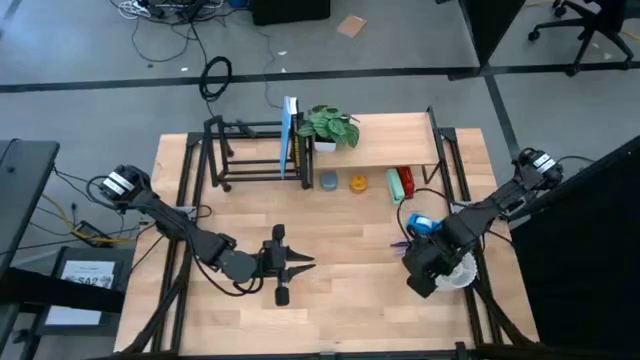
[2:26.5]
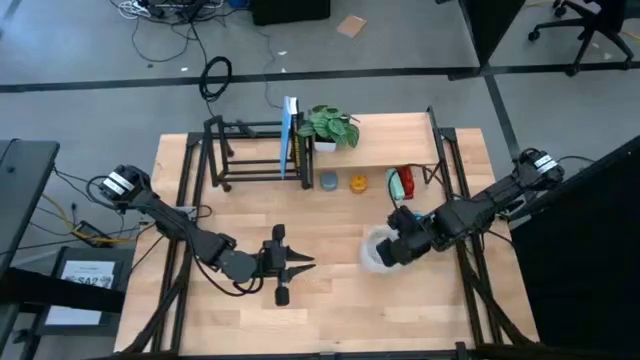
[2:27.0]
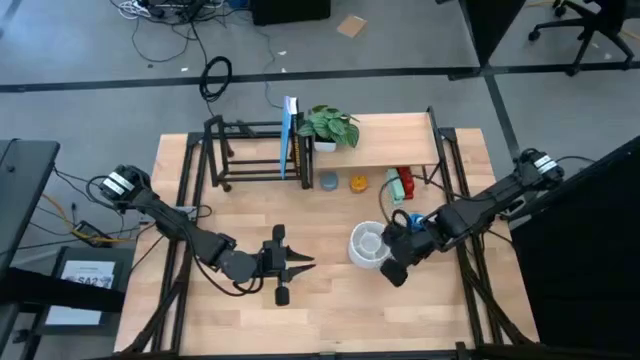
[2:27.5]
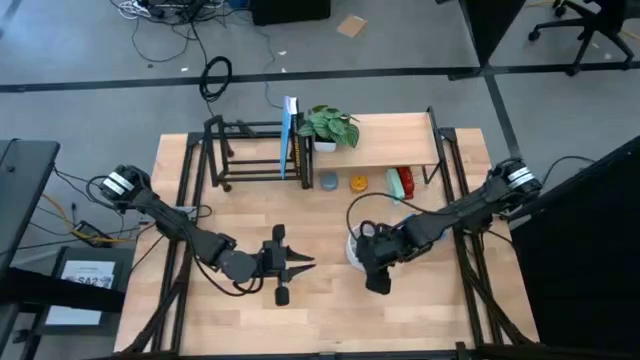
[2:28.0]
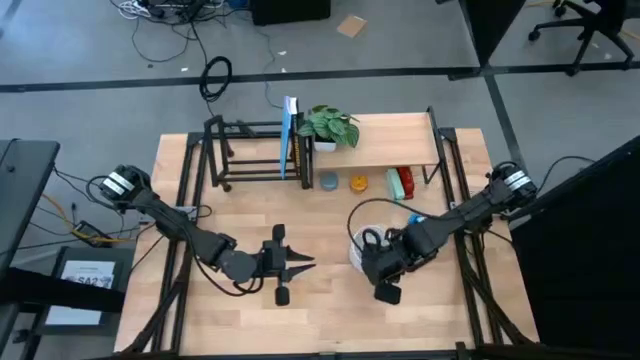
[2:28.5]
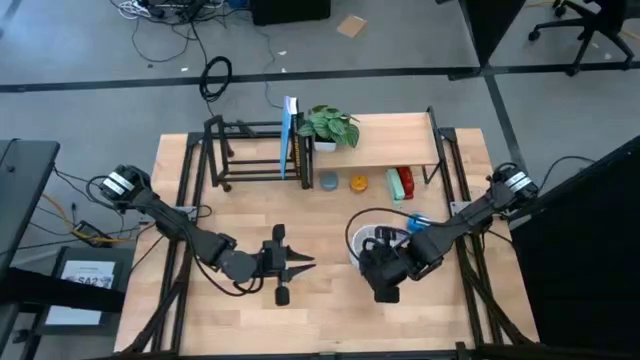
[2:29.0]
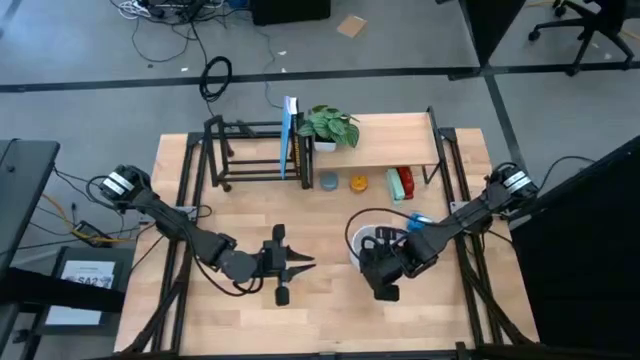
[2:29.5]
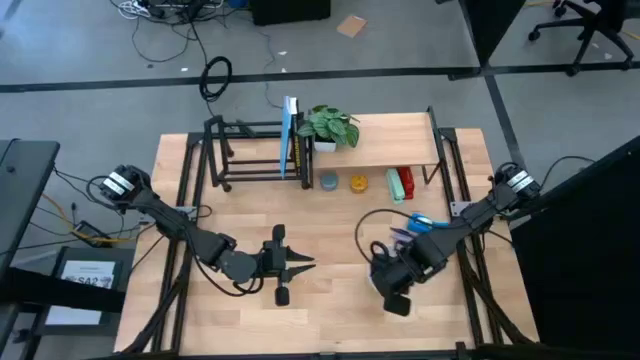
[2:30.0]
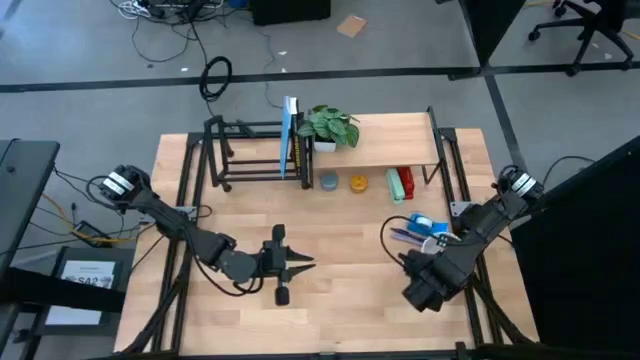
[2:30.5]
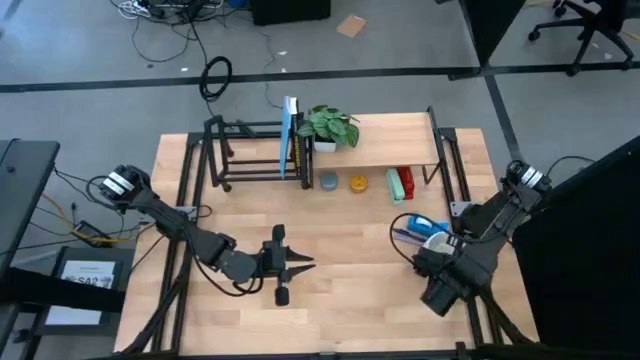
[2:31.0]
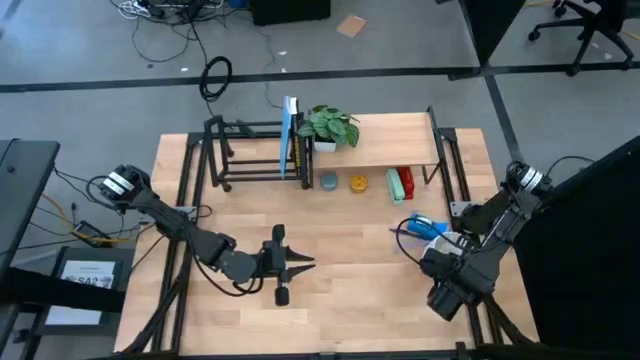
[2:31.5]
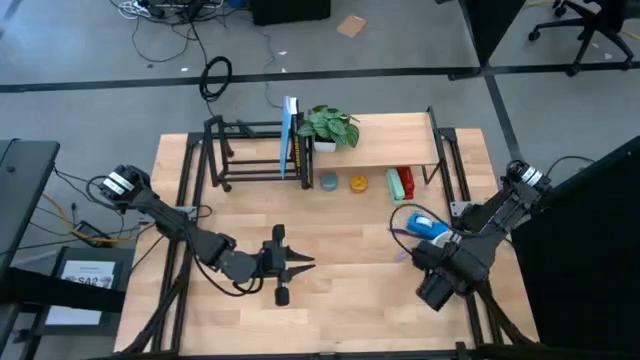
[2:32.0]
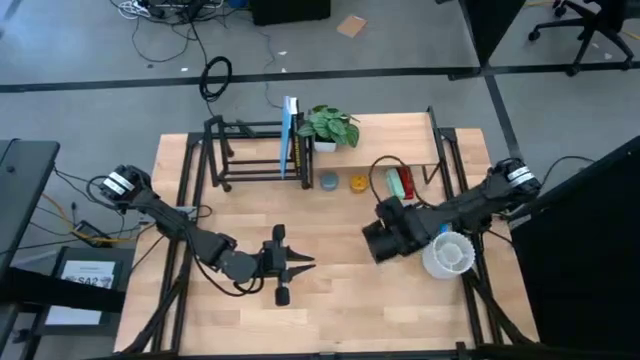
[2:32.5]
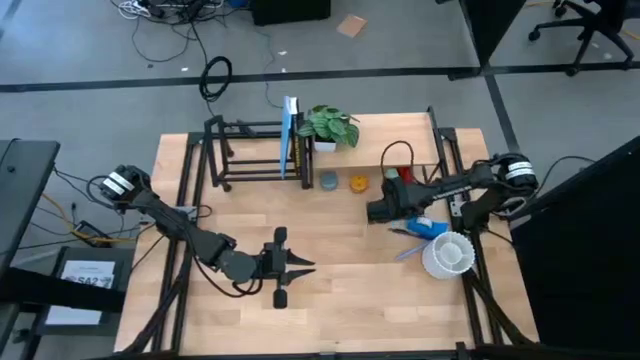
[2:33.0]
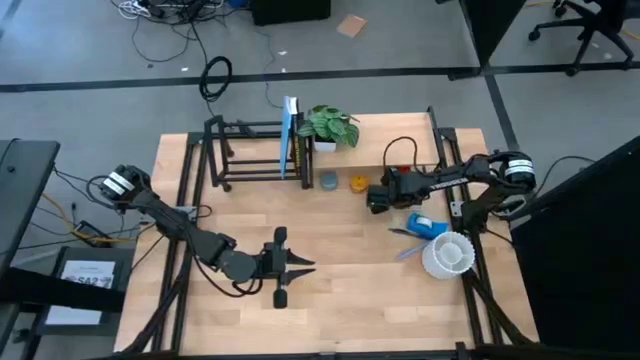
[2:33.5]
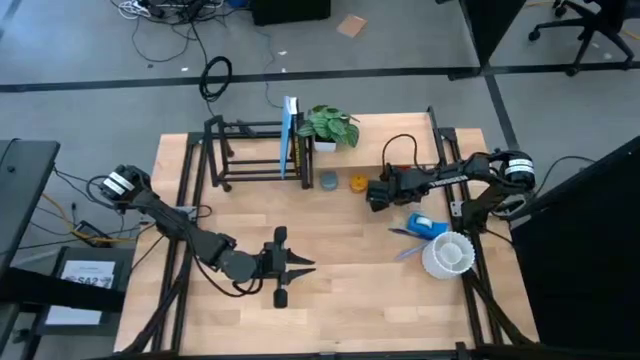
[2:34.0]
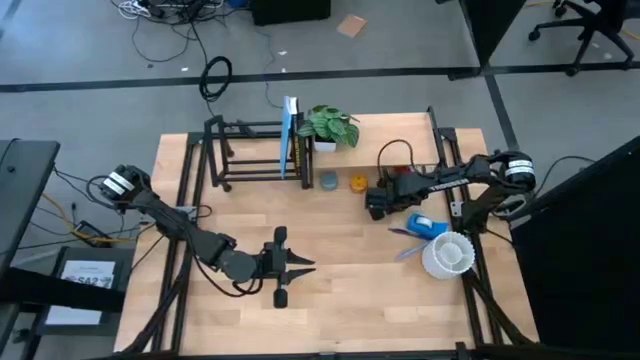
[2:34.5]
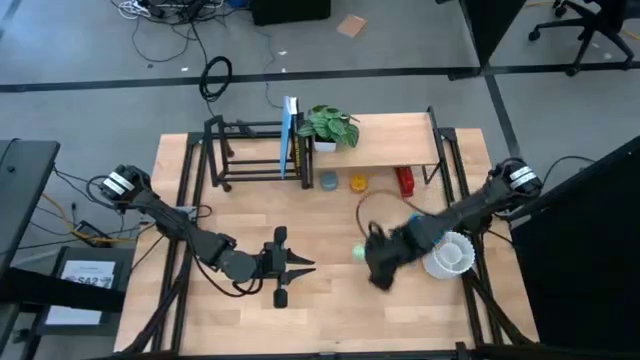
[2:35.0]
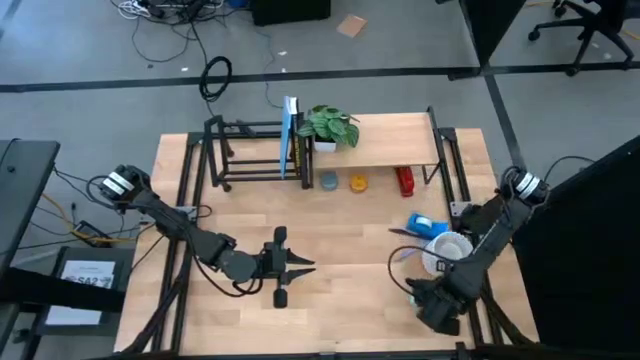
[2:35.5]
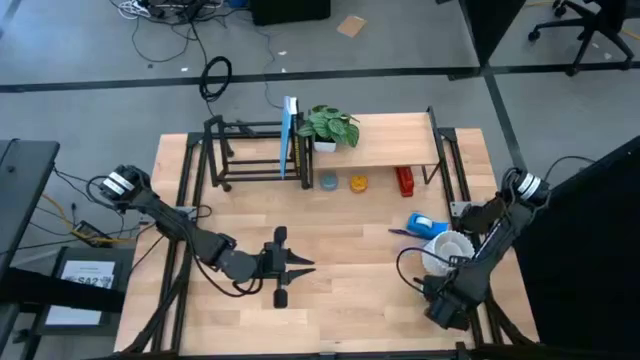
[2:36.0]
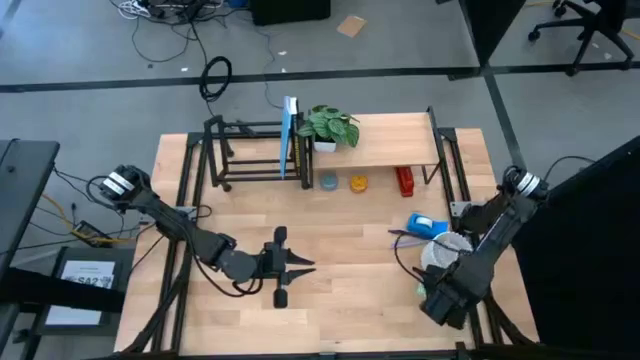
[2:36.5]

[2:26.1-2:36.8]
Task: Stock shelves
Remove the green stapler from under the shelf

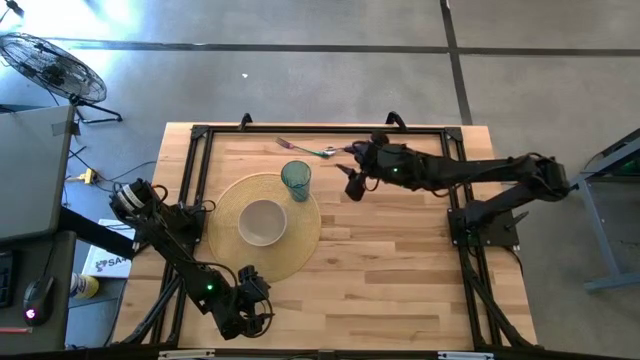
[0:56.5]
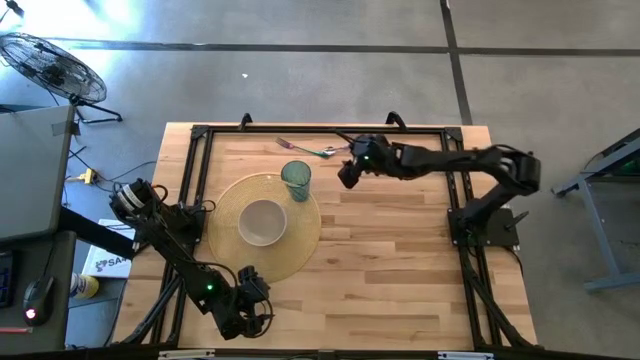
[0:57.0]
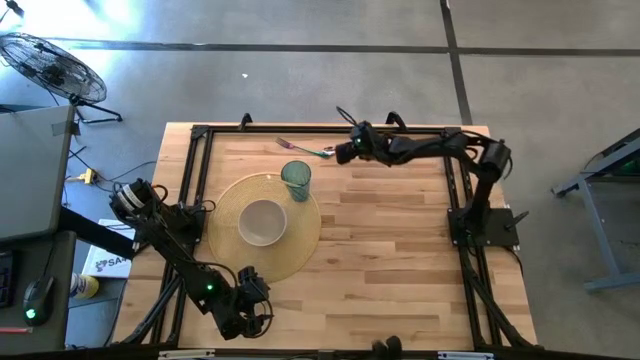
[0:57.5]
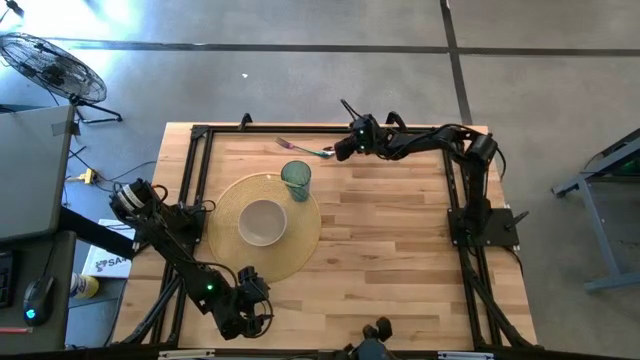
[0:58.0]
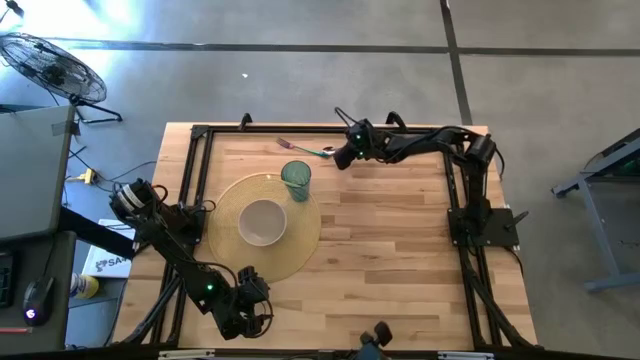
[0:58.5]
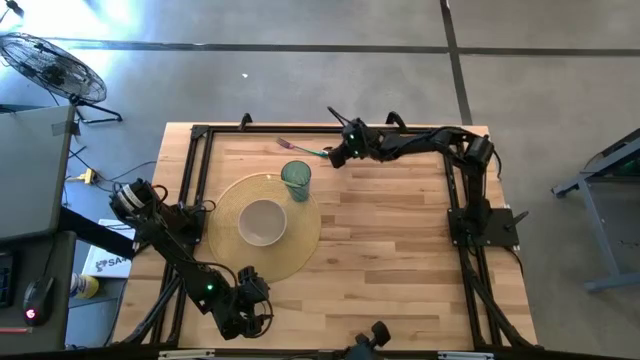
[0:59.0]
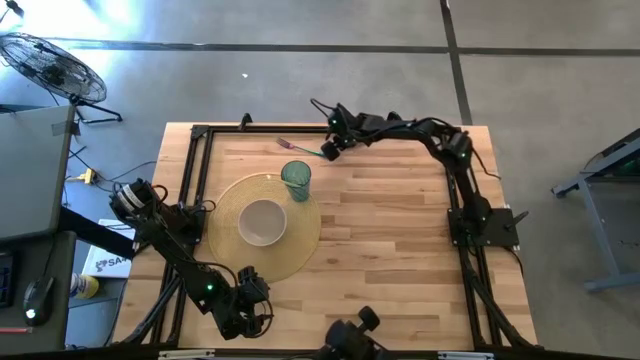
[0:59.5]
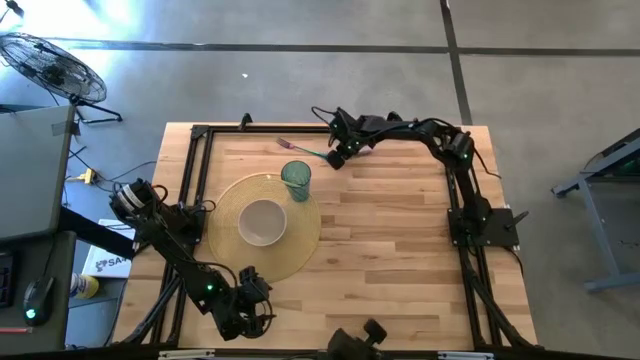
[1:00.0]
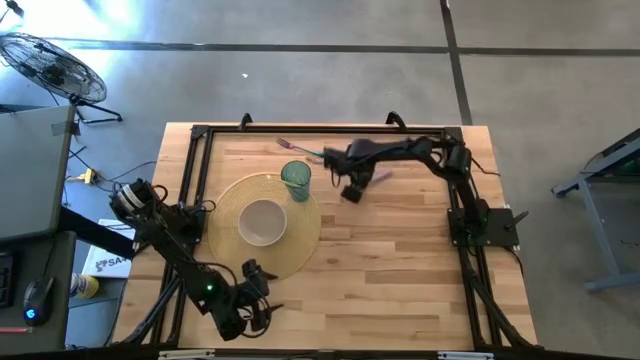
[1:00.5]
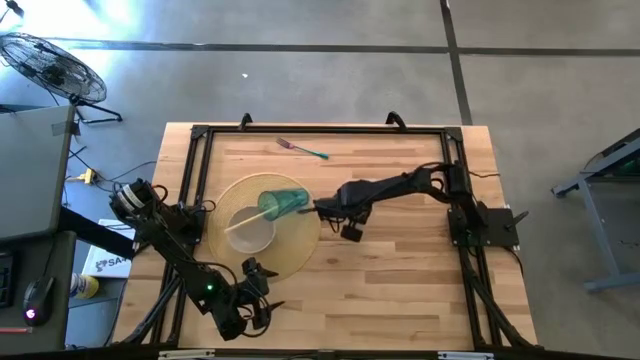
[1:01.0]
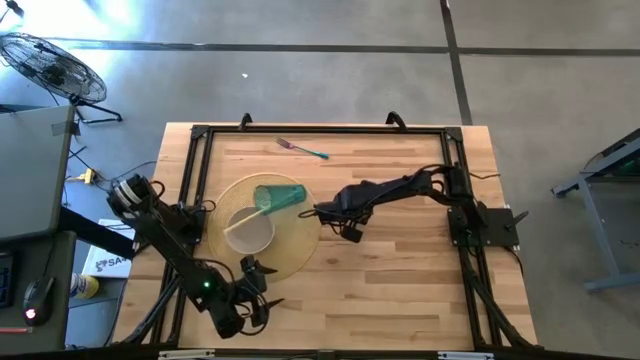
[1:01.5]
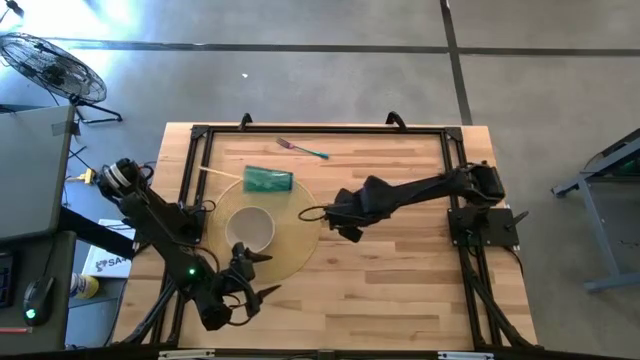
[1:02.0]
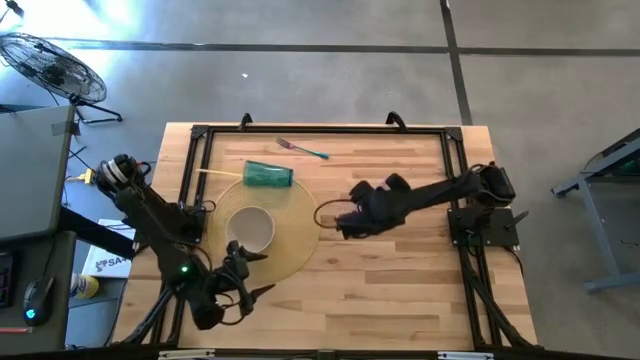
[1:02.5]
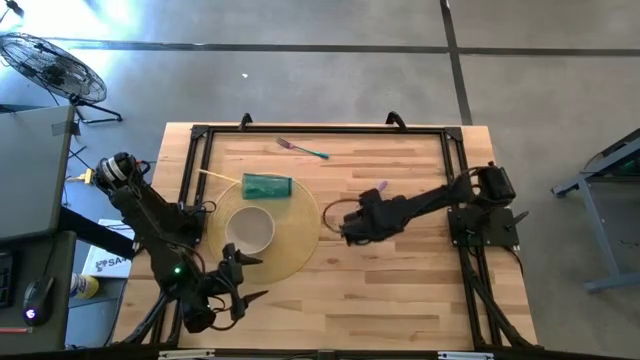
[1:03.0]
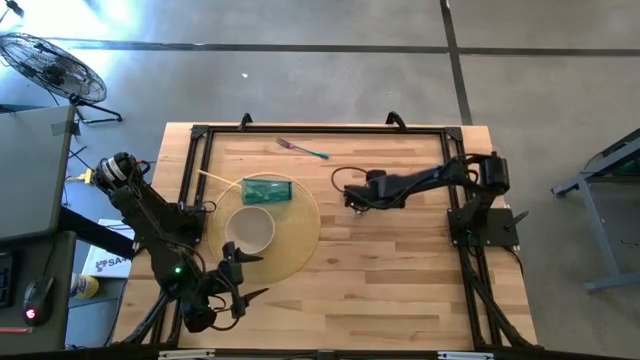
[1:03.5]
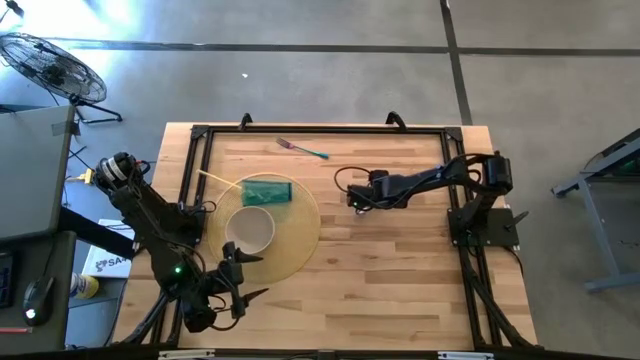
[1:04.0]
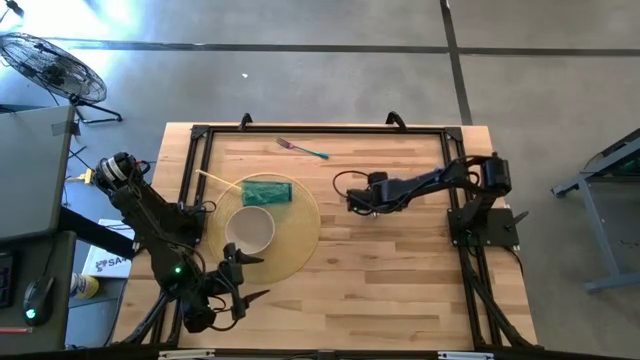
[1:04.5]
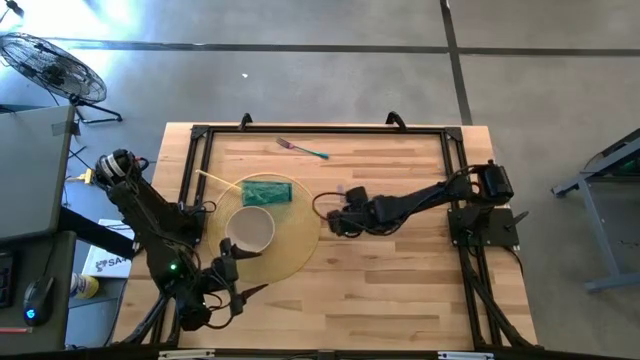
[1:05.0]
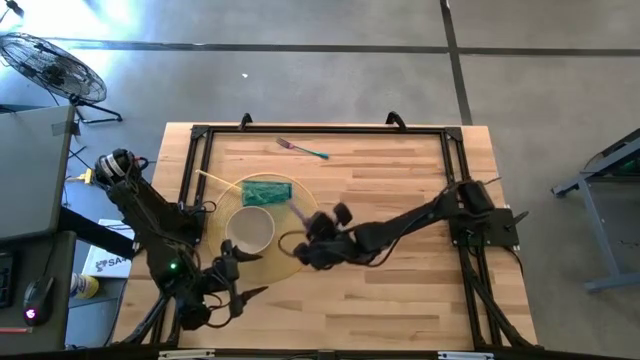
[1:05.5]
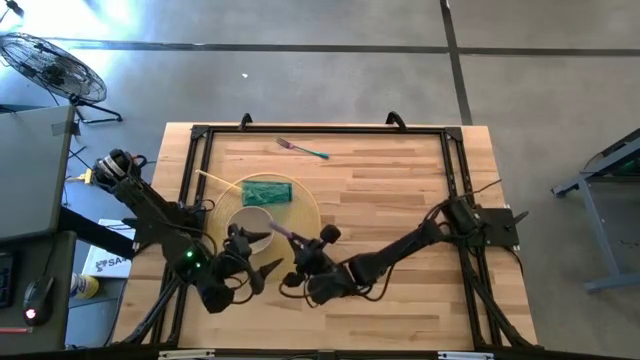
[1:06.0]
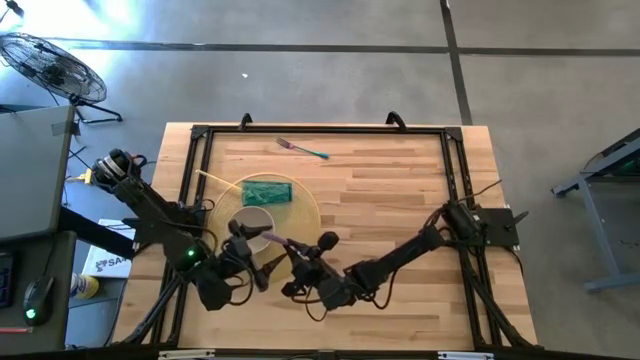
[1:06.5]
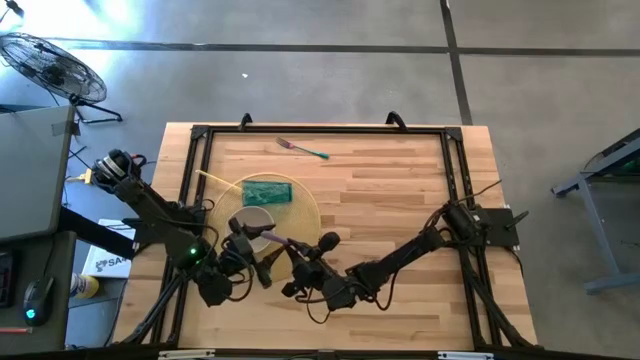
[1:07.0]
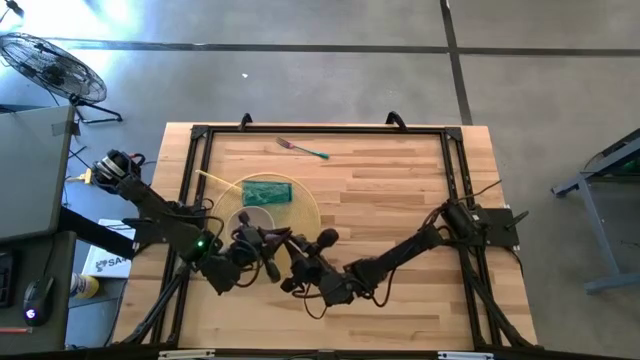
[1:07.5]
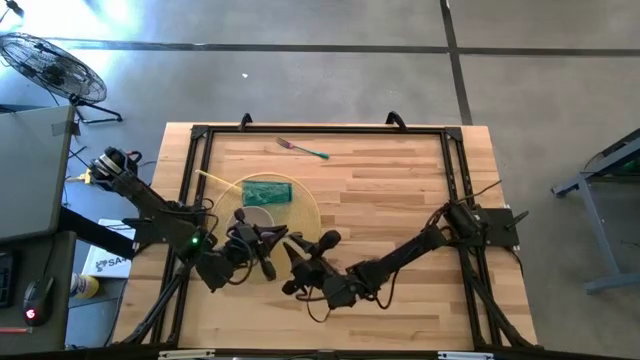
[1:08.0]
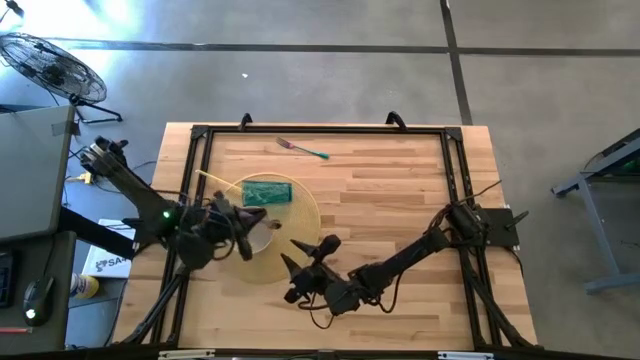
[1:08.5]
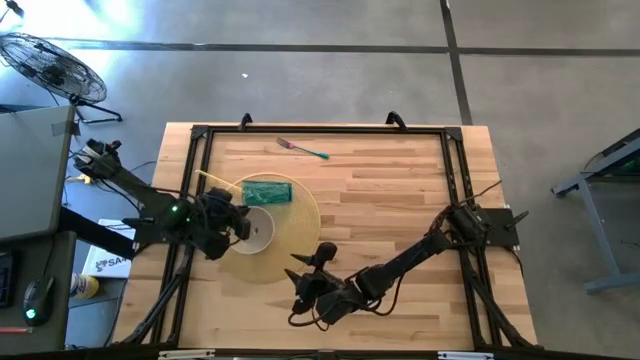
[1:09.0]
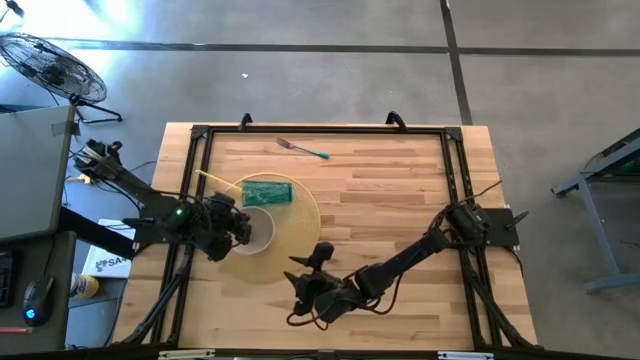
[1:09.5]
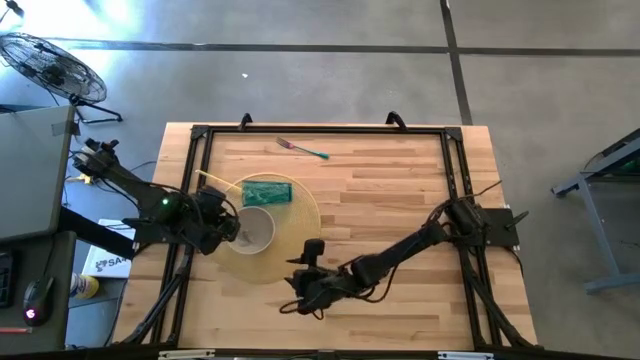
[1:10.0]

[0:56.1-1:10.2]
Task: Pick & Place Utensil
Put the purple spoon into the white bowl
